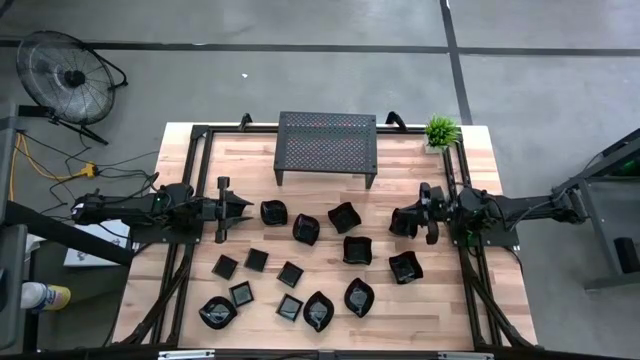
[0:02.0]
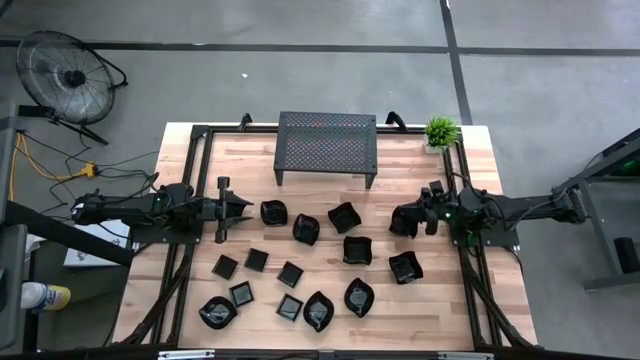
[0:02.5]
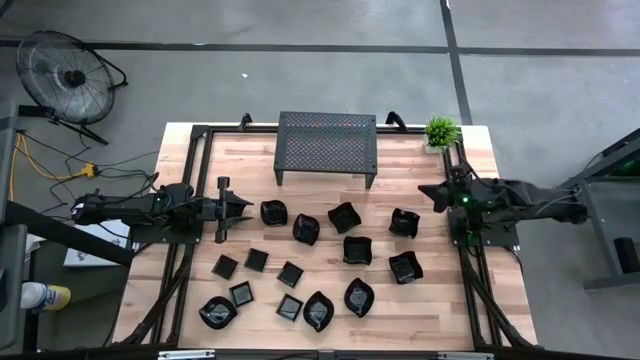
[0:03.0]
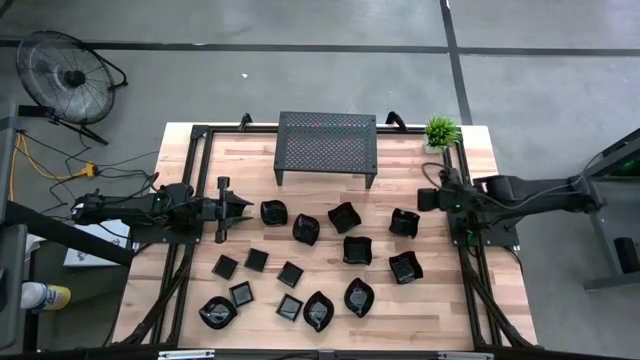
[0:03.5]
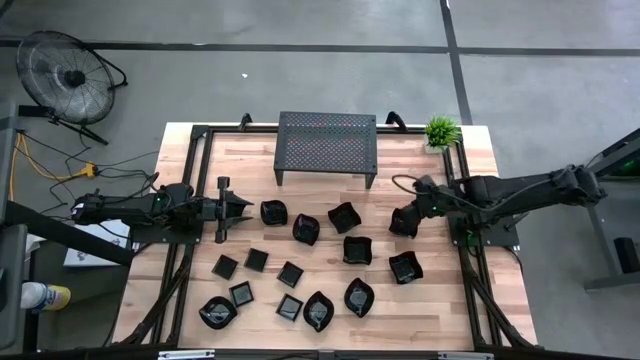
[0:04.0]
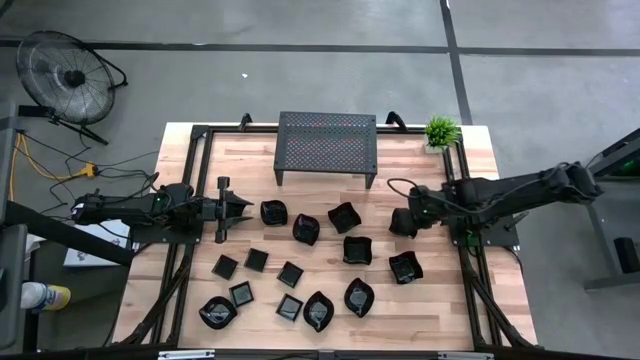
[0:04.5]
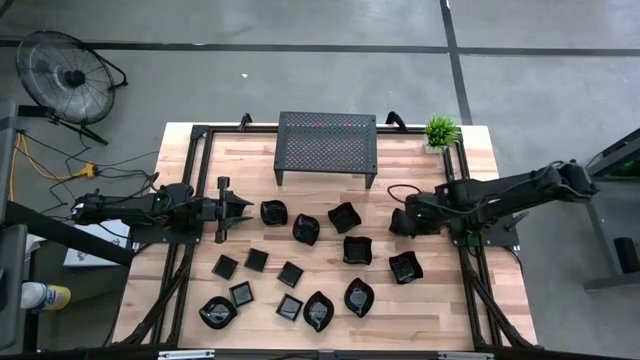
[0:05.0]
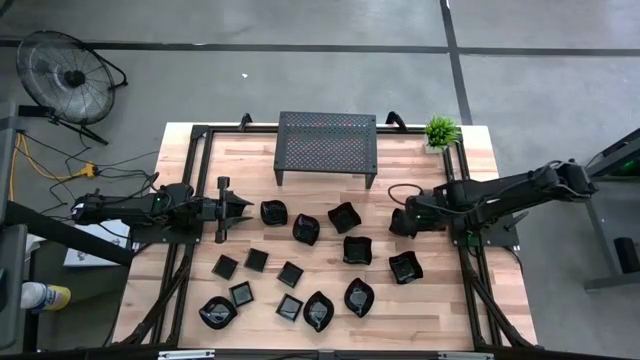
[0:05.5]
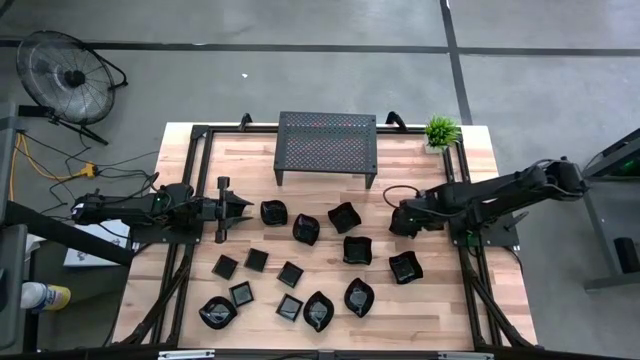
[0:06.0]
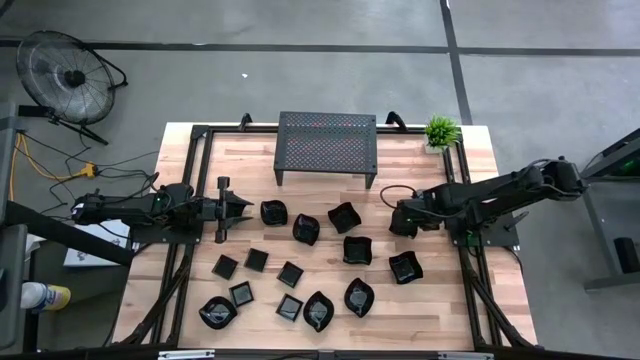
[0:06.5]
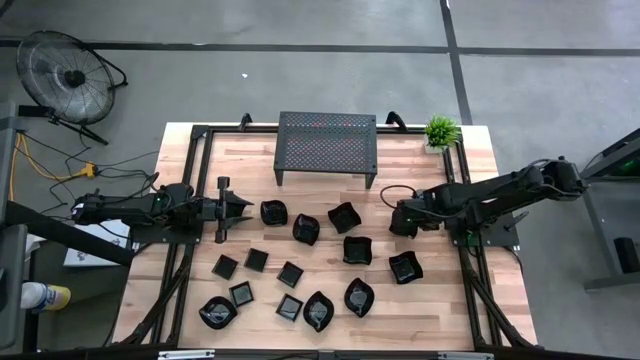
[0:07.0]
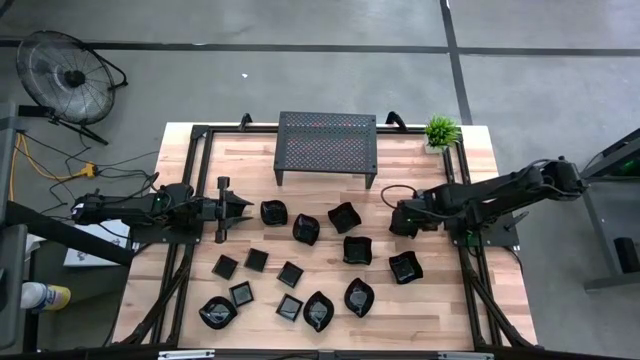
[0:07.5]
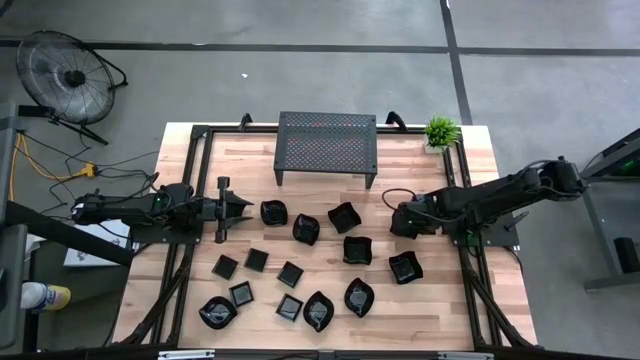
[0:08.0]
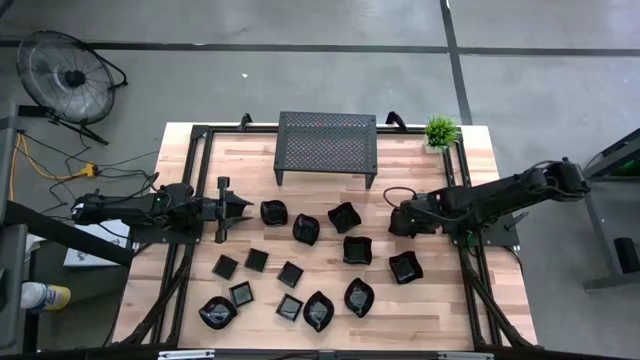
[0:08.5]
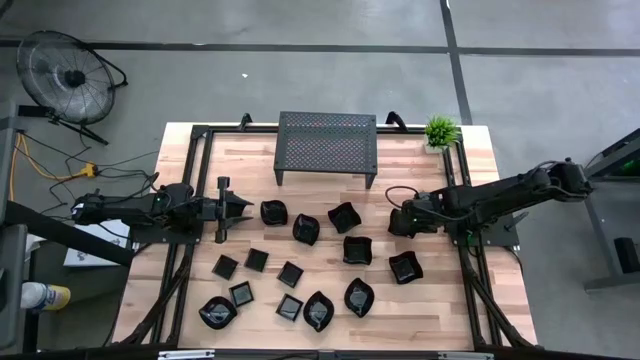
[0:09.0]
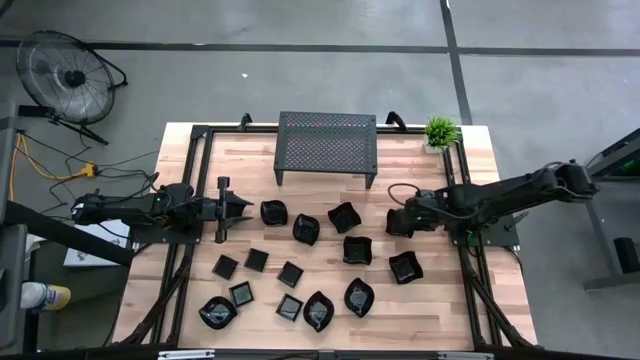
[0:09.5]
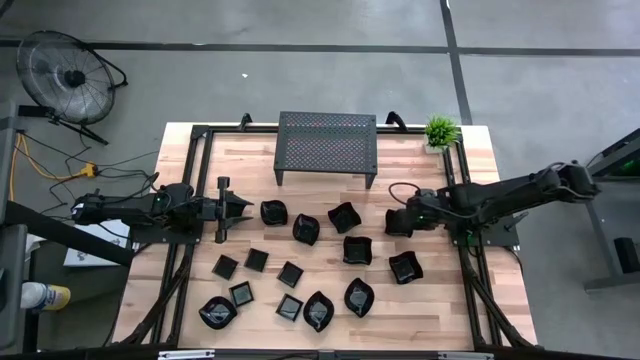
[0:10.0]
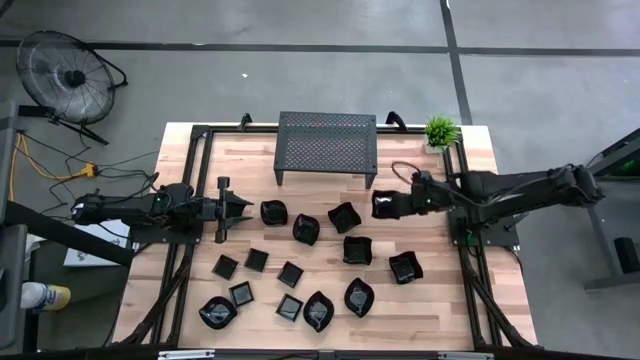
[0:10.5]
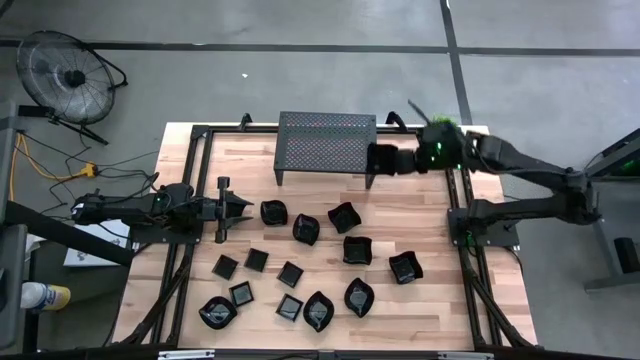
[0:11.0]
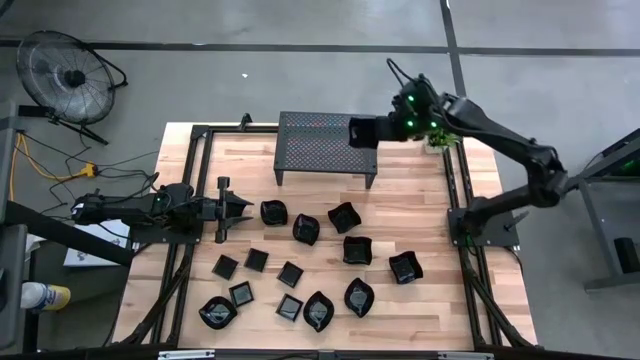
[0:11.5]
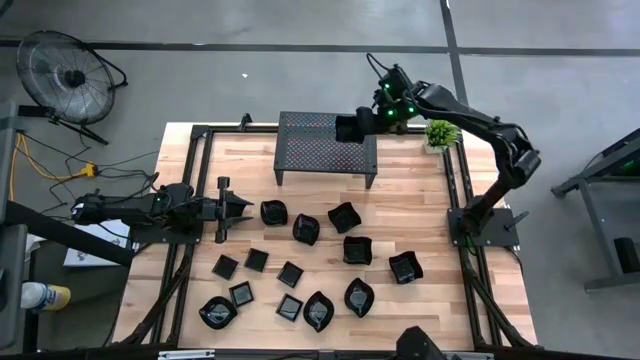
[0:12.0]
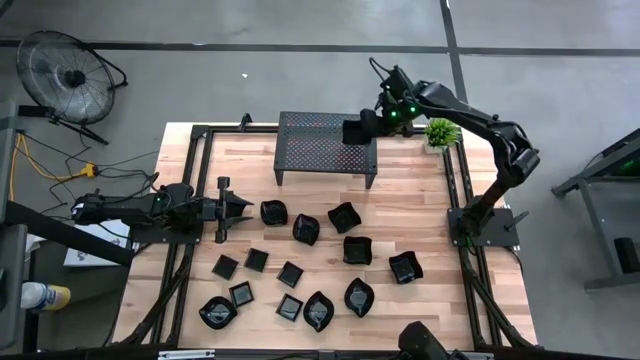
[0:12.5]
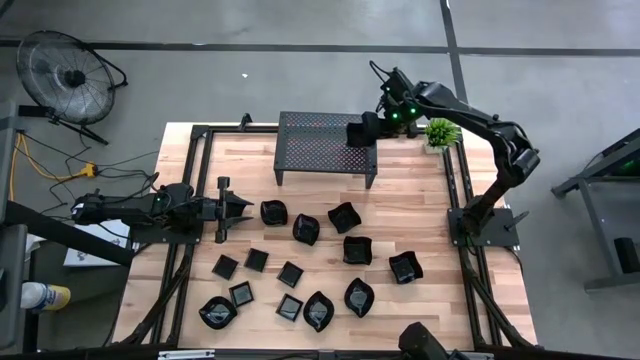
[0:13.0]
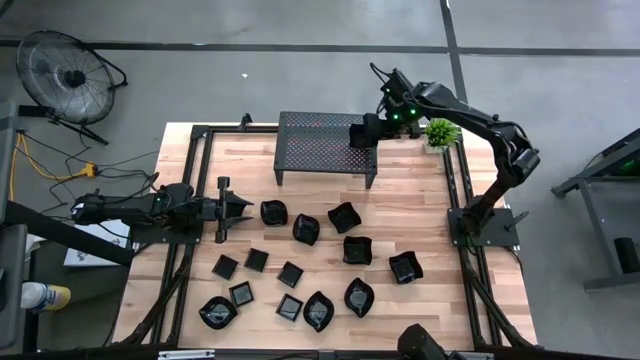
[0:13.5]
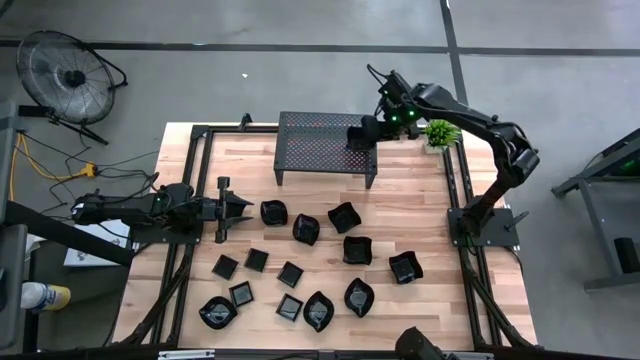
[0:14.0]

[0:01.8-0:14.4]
Task: Pick & Place Mini shaped plates
Put the black distorted square plate on the shelf

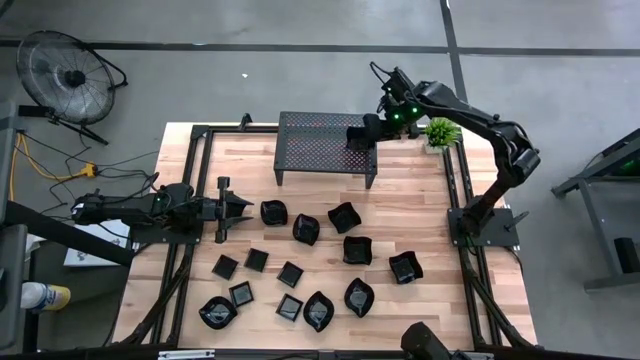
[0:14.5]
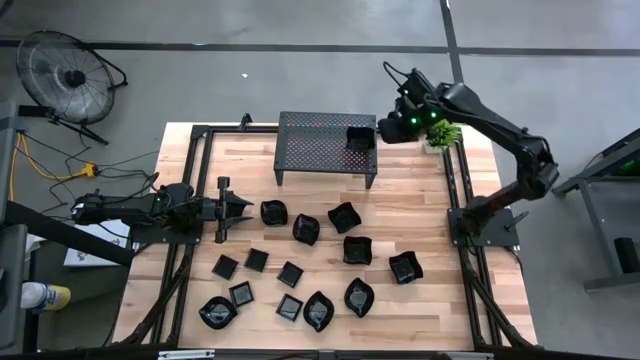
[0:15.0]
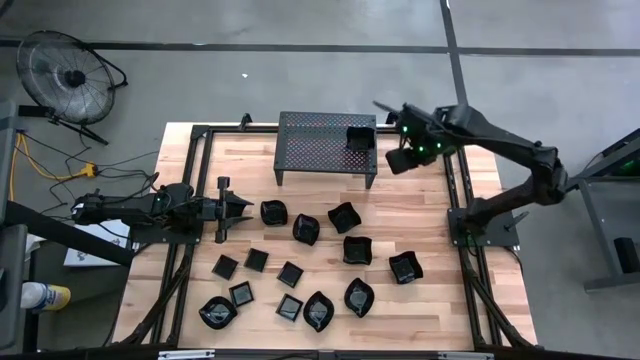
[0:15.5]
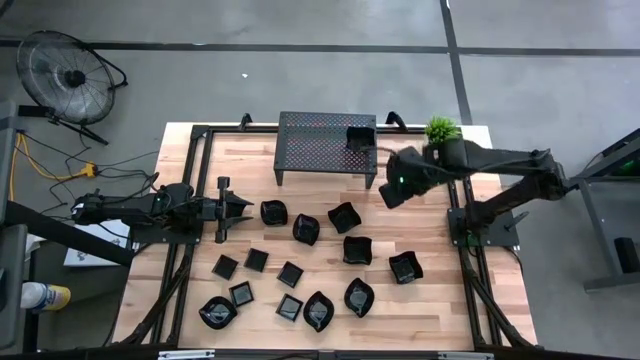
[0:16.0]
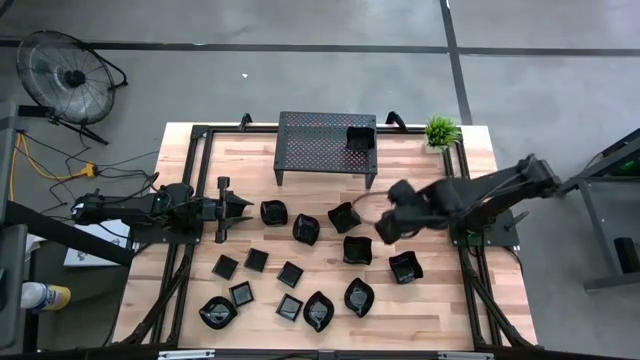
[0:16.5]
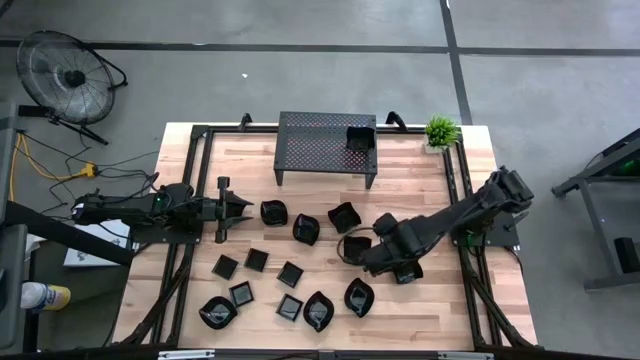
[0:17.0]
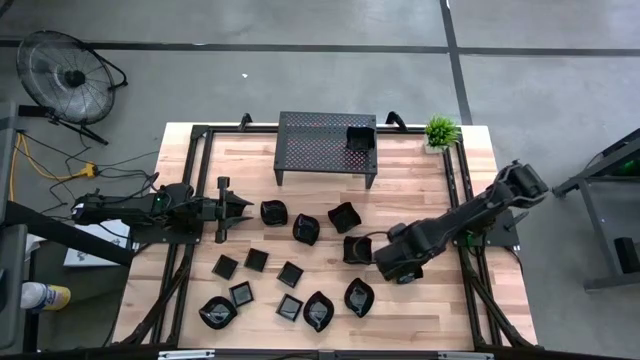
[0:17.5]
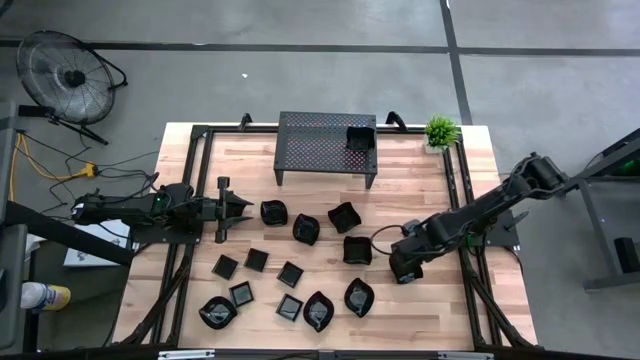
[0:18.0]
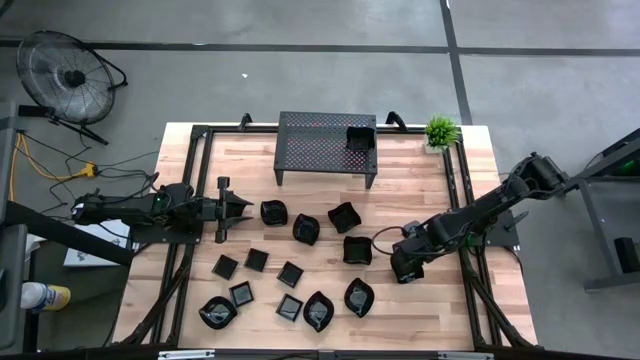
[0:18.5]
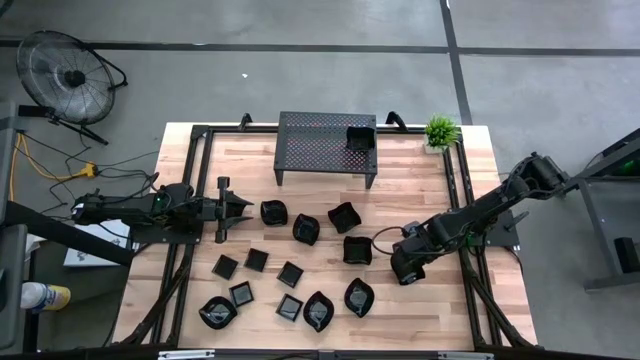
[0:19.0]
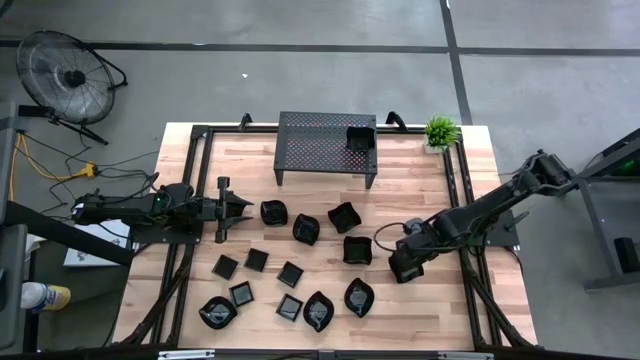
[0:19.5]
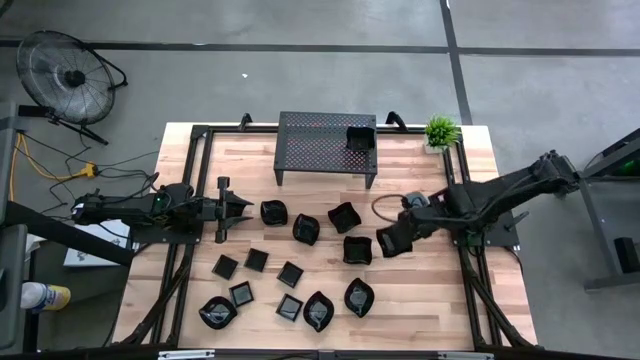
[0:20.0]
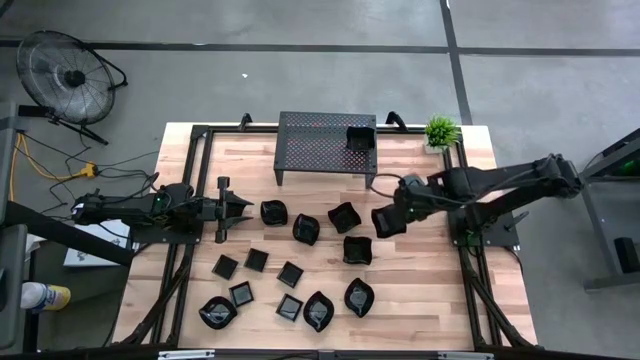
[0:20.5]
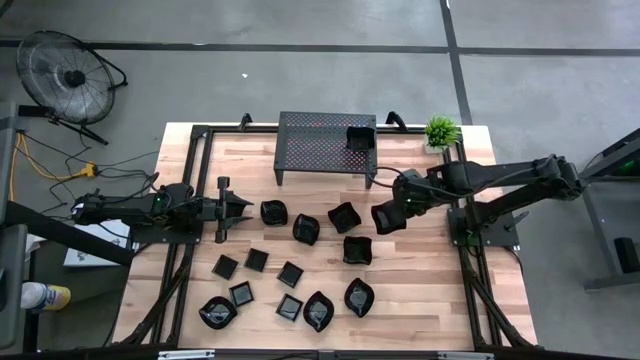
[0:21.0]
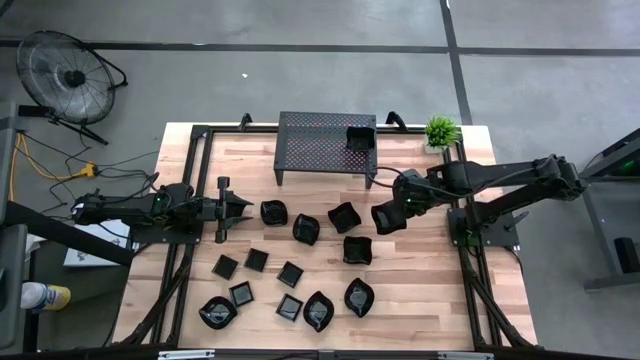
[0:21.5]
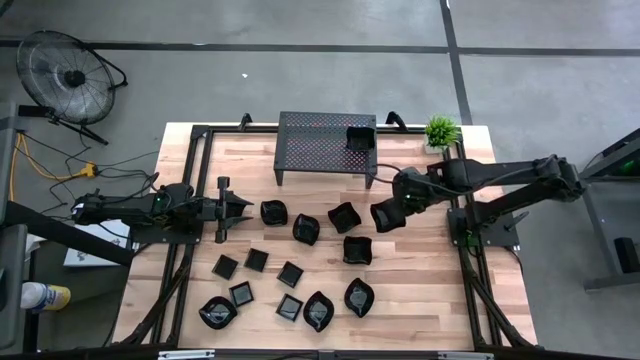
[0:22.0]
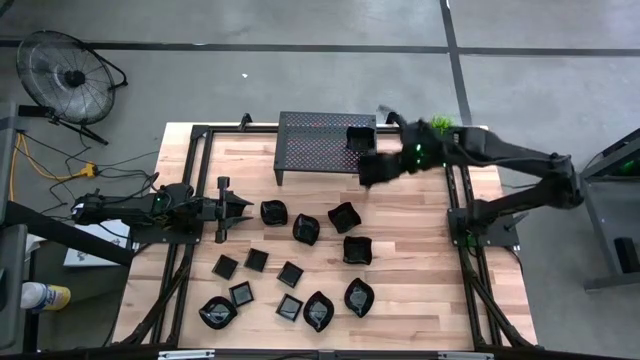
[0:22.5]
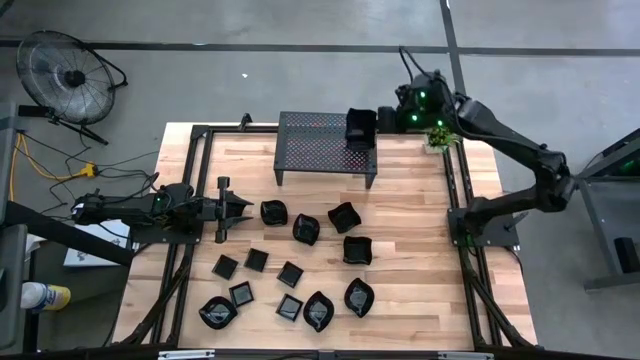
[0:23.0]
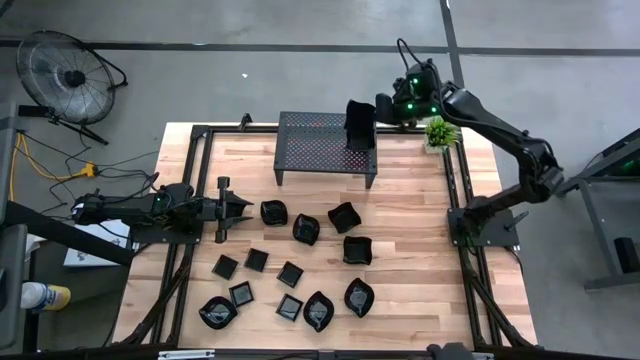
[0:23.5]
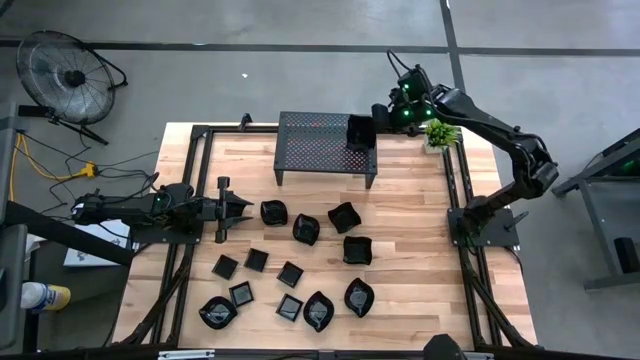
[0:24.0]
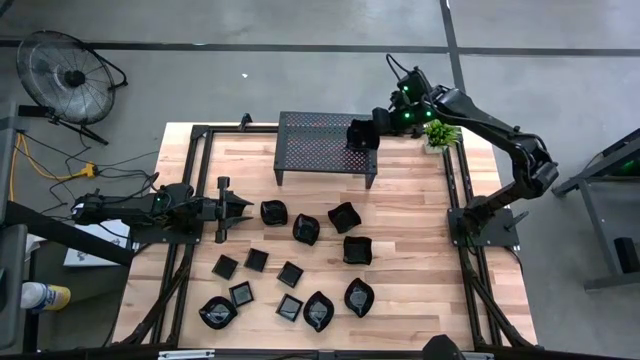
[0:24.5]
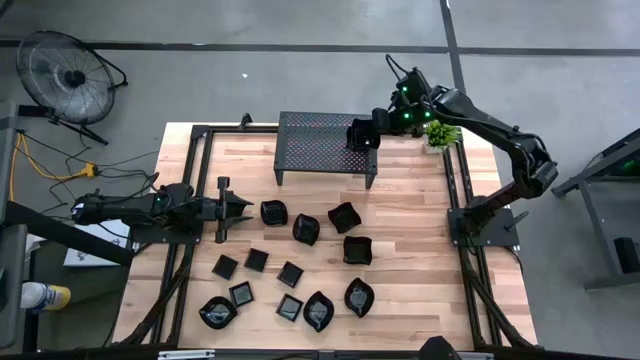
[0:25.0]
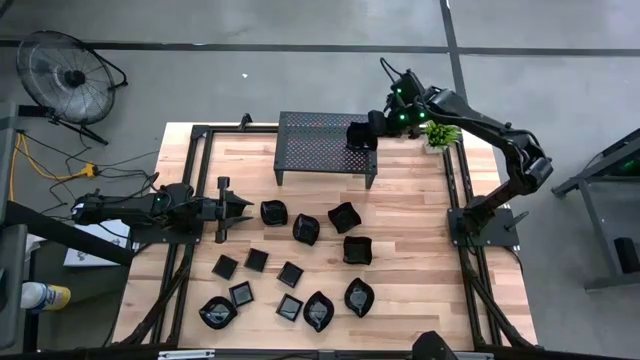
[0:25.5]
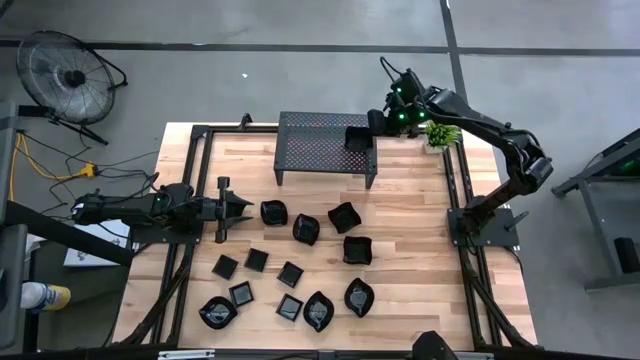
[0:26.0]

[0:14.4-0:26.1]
Stack the black distorted square plate on top of the black distorted square plate on the shelf
